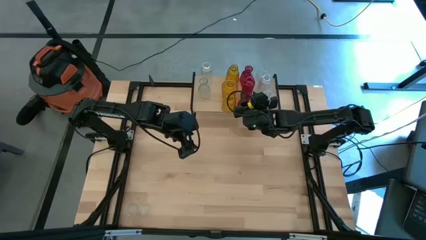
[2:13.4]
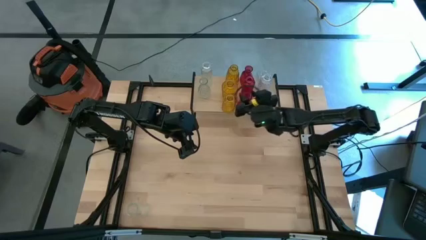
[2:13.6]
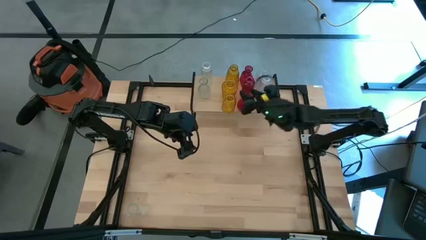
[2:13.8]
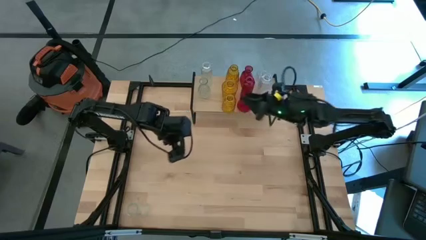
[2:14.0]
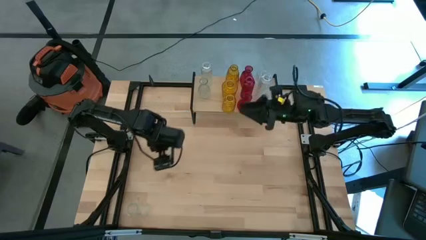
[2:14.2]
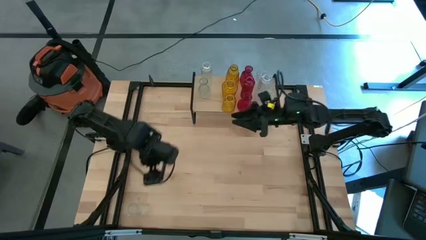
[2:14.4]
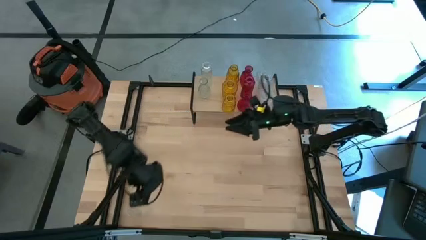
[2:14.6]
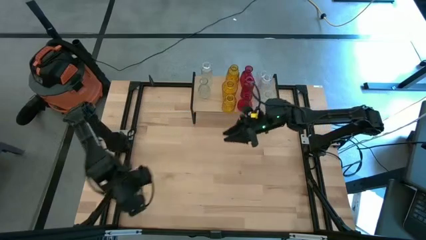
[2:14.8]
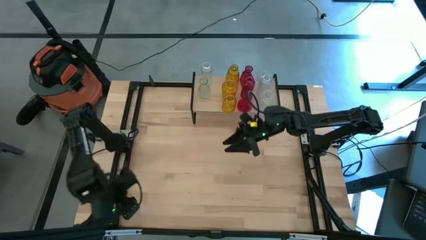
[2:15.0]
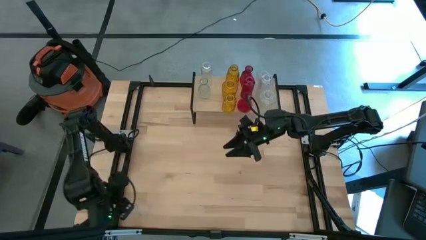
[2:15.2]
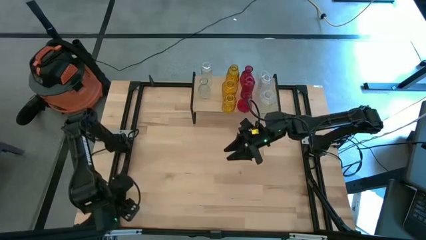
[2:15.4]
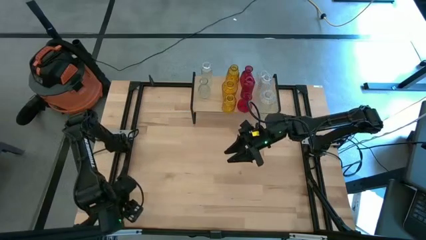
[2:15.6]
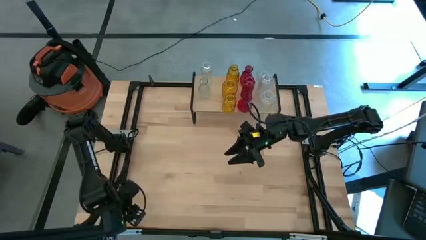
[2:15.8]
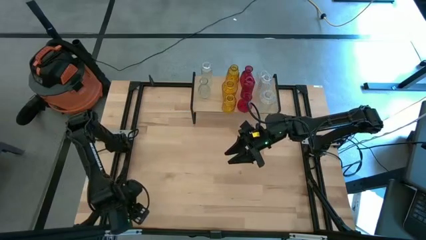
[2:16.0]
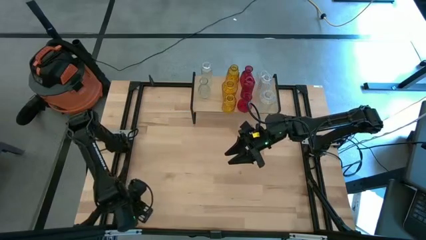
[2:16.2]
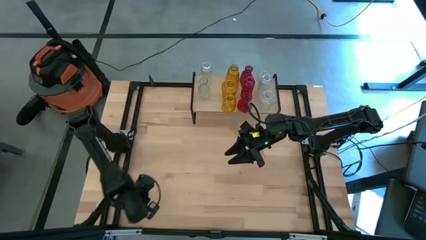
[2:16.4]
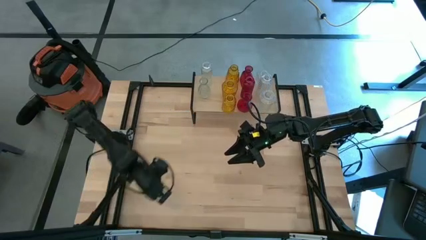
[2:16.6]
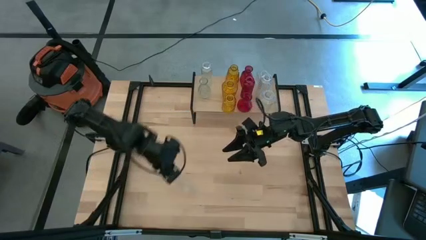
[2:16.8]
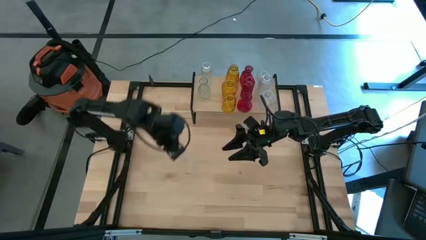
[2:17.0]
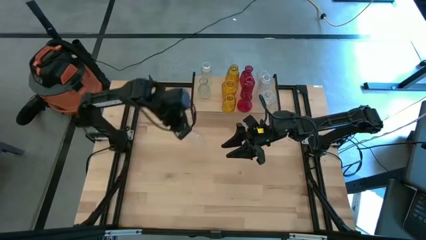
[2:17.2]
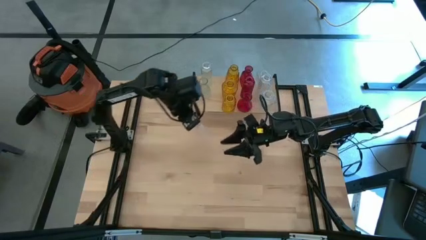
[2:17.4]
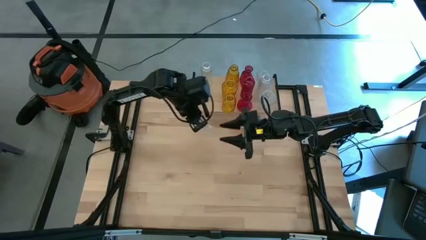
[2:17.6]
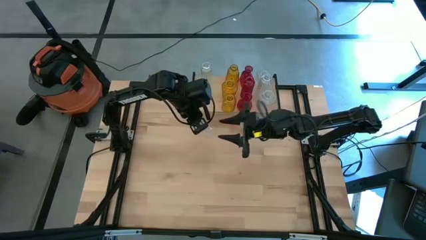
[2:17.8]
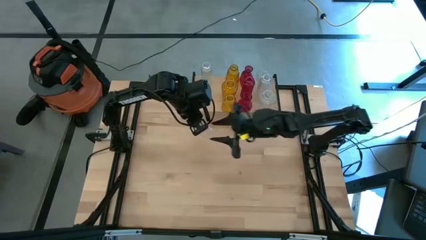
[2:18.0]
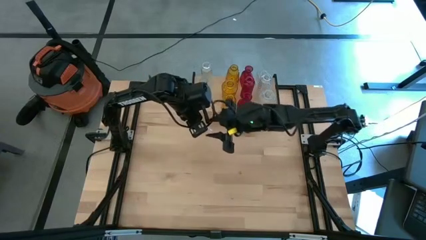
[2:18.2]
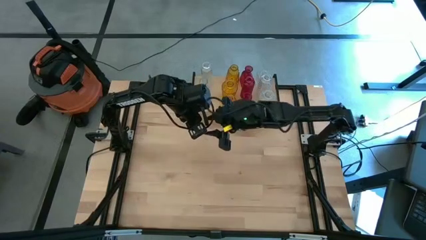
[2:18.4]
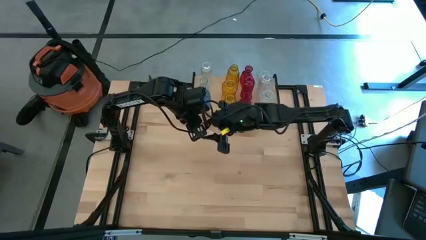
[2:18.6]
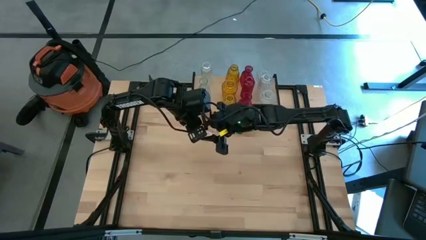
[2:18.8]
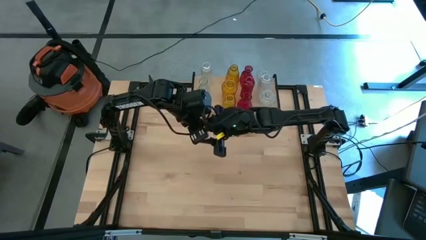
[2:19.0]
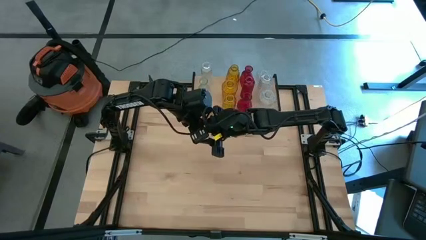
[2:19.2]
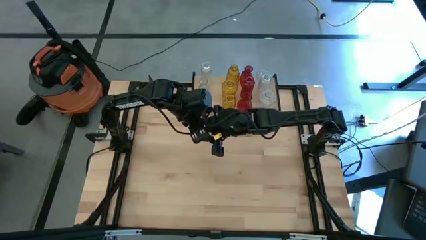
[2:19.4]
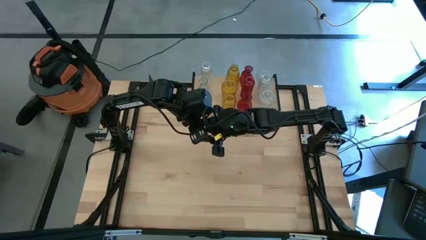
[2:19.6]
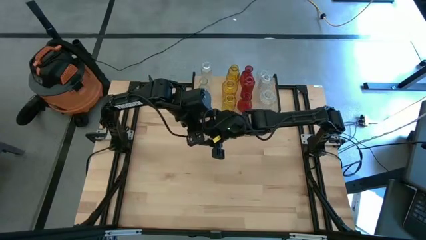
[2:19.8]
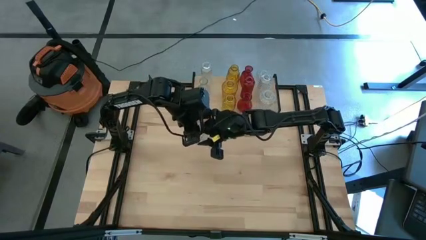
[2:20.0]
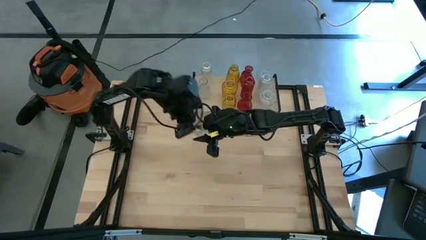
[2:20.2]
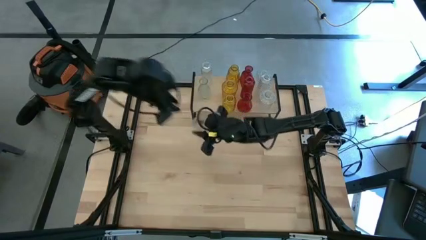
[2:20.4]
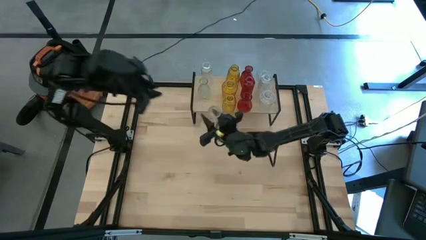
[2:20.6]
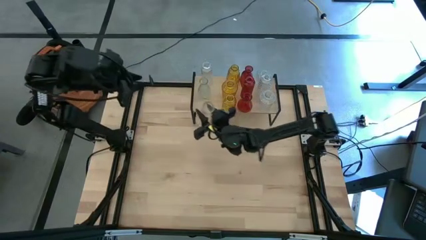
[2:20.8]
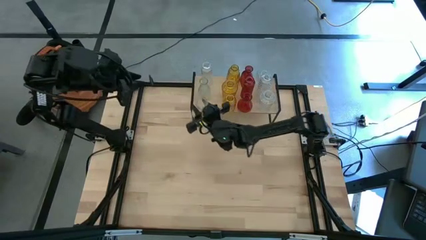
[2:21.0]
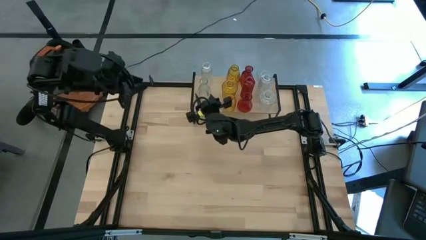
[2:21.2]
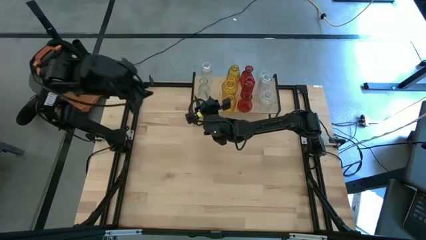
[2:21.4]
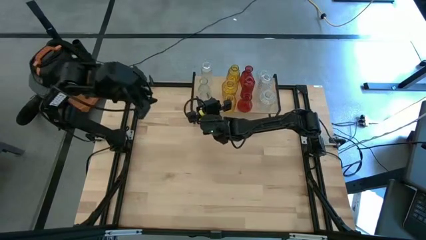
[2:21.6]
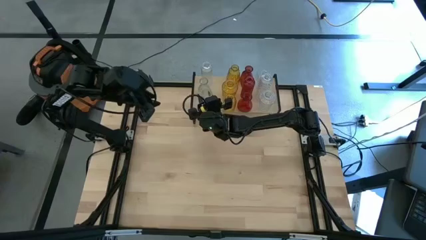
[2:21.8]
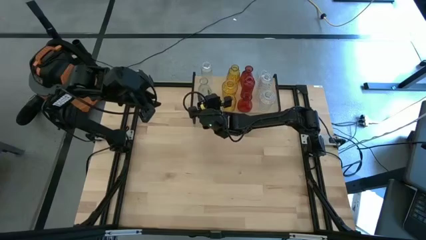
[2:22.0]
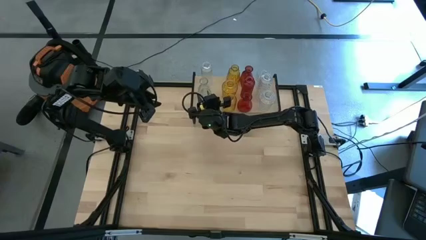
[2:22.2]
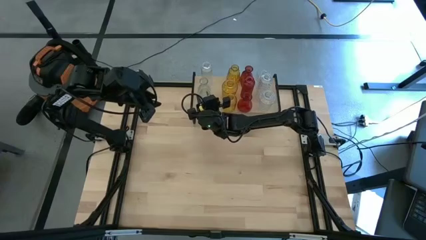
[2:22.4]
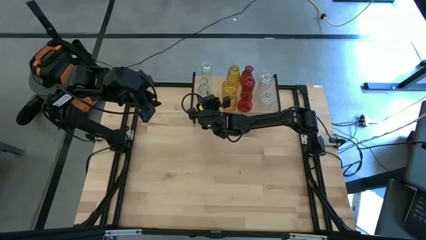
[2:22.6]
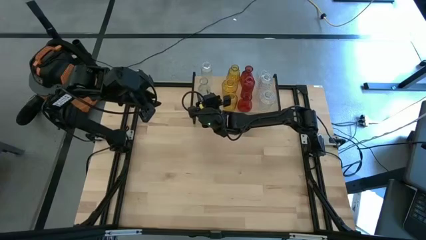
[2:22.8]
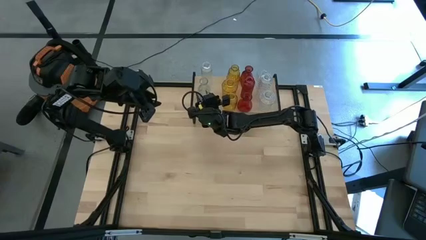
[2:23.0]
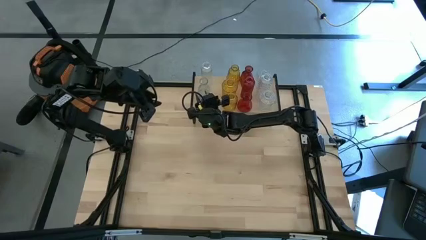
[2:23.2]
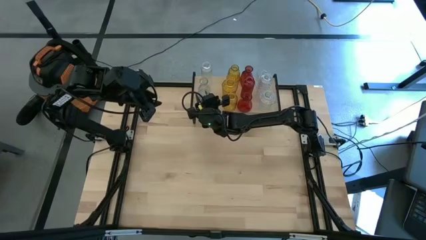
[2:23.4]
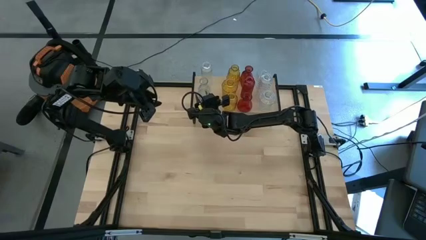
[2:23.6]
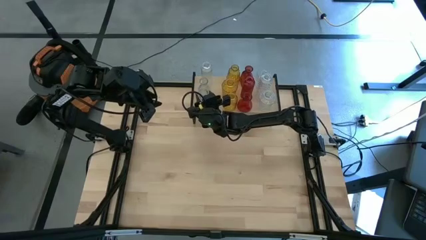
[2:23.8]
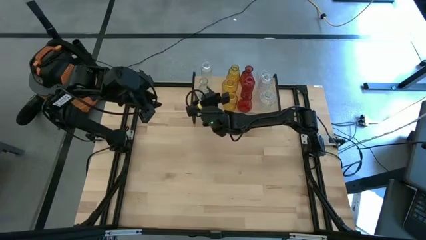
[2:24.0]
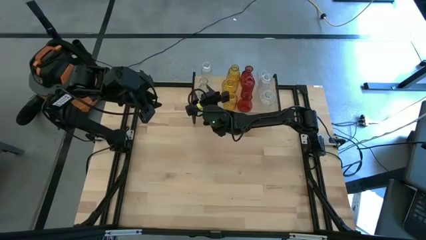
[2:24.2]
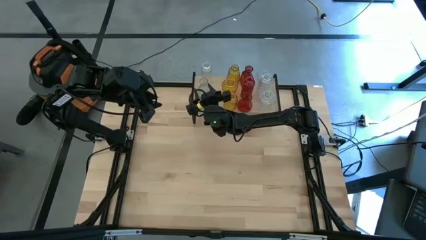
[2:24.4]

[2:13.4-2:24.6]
Task: sort vases onto shelf
Put the transparent vase on the shelf aligned with the other transparent vase

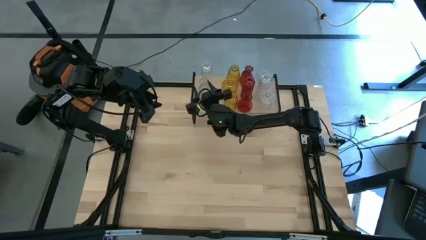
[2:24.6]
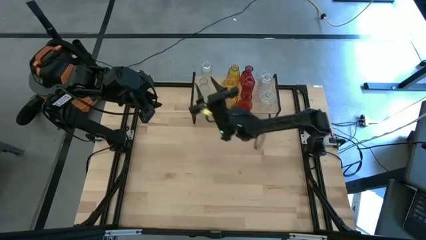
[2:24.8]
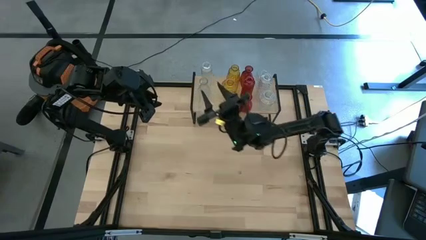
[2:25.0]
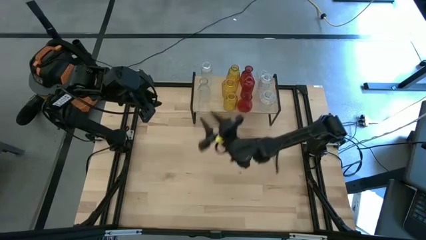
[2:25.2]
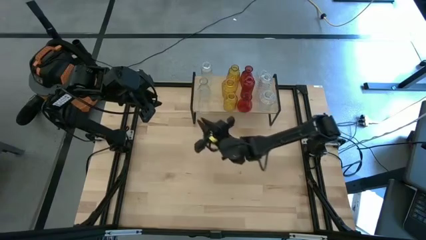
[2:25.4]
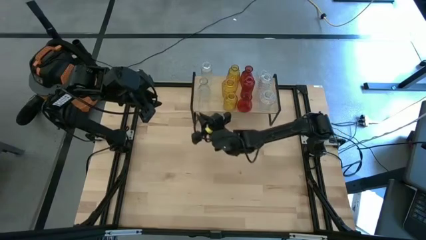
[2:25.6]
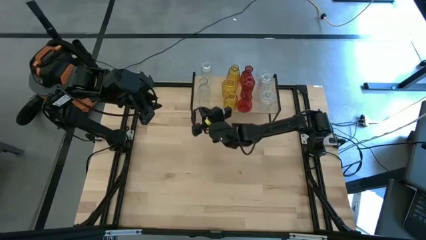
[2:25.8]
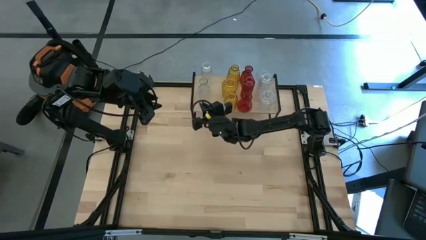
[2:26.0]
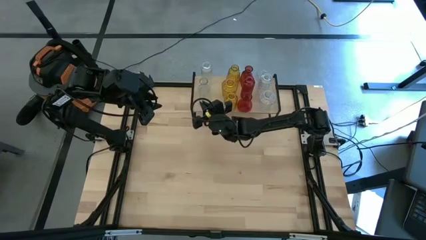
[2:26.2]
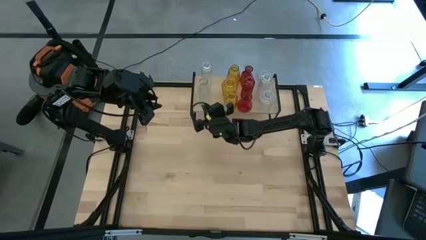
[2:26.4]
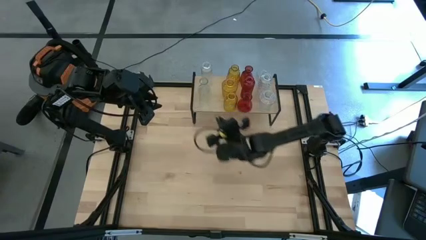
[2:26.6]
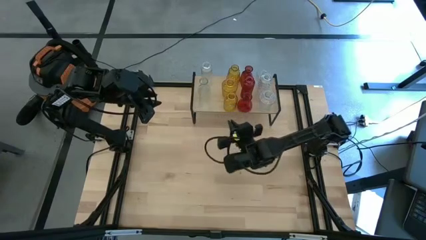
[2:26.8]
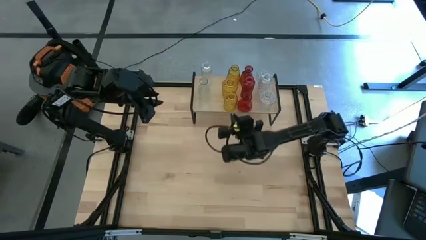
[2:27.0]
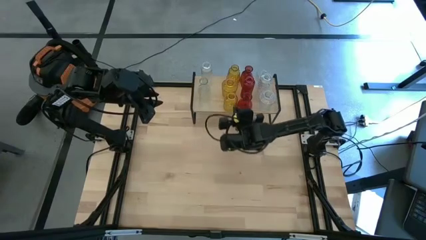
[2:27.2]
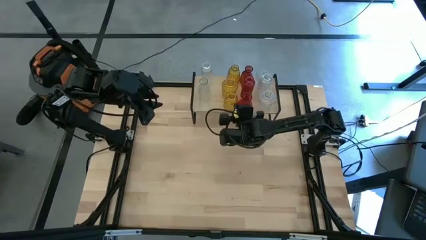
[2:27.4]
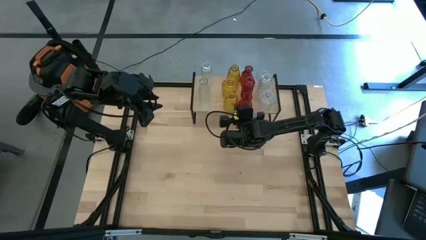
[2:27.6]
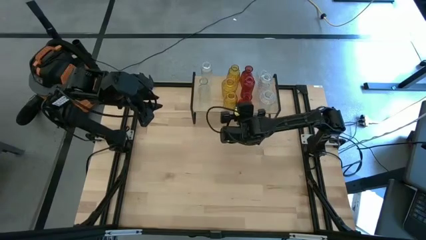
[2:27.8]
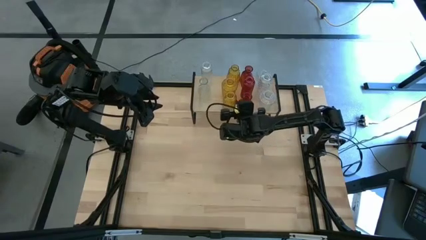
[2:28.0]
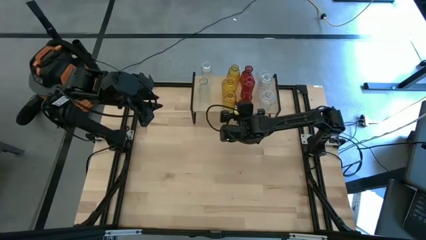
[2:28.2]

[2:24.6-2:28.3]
Adjust the yellow vase
